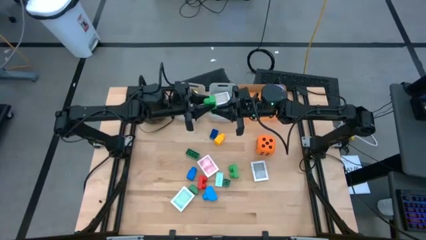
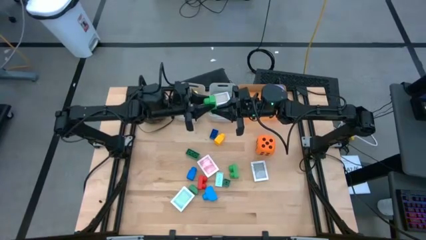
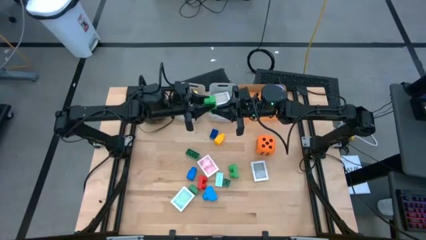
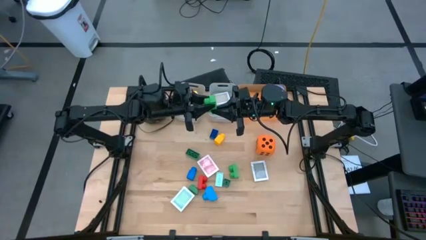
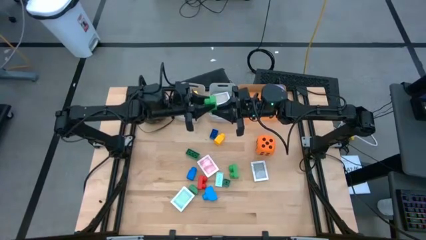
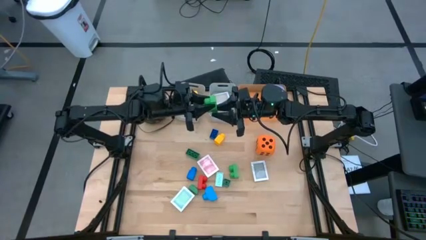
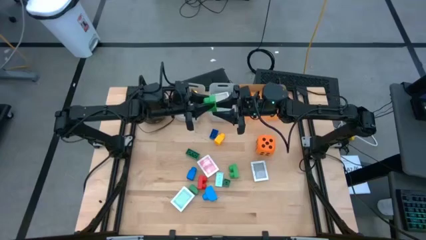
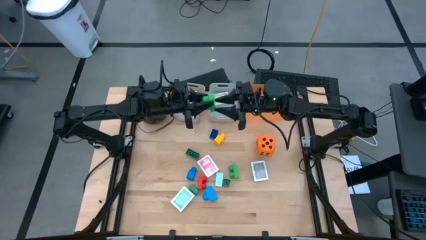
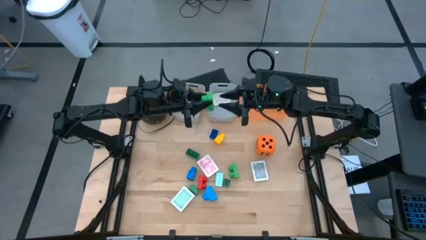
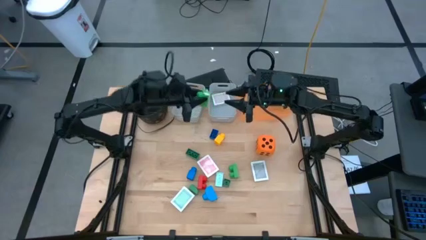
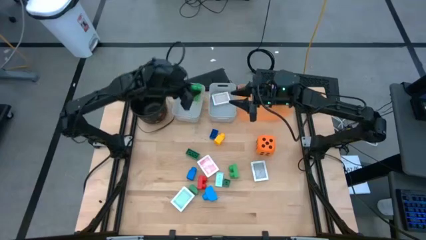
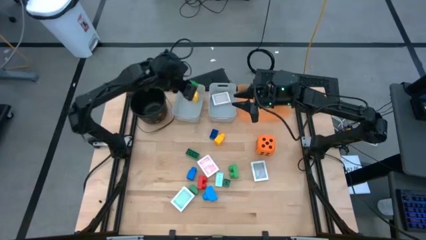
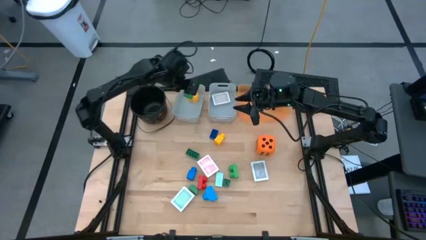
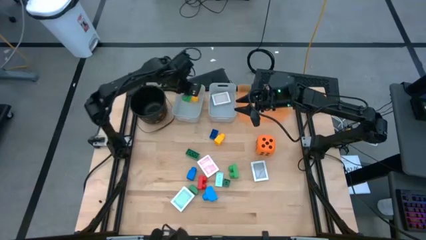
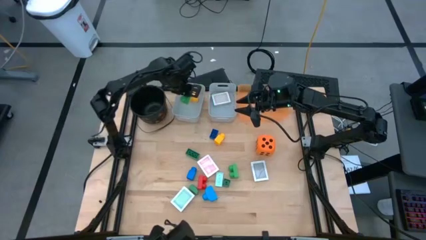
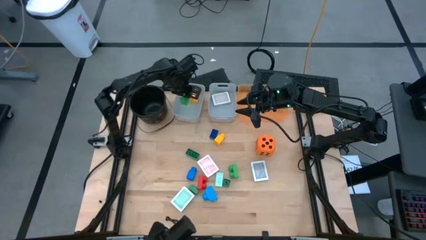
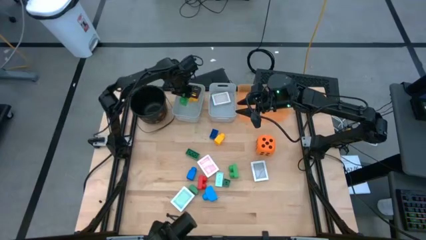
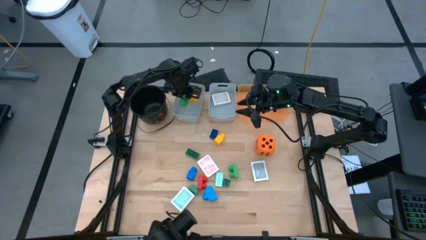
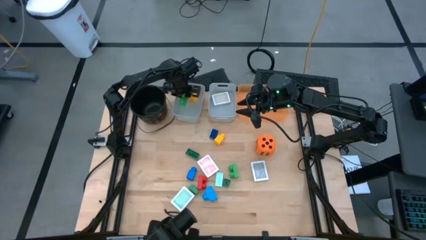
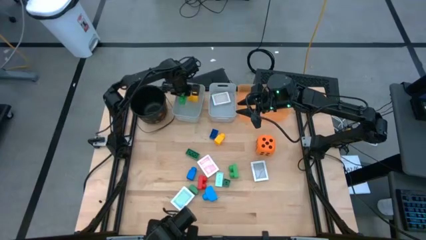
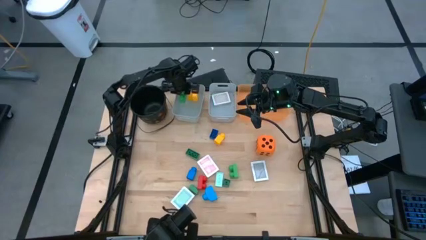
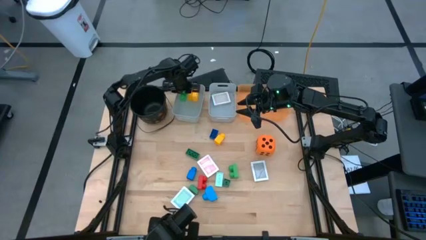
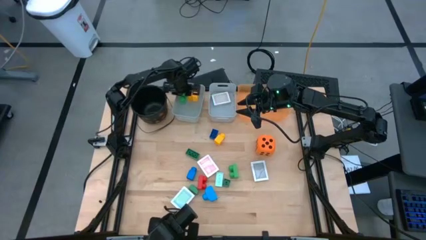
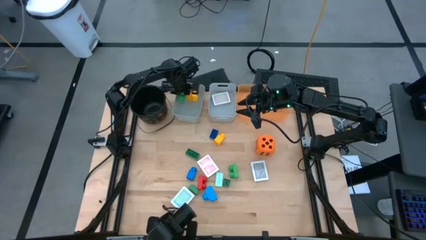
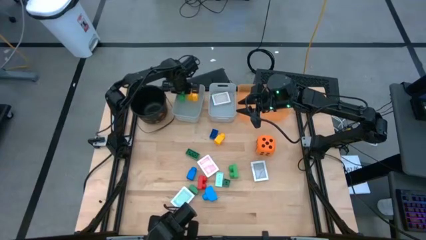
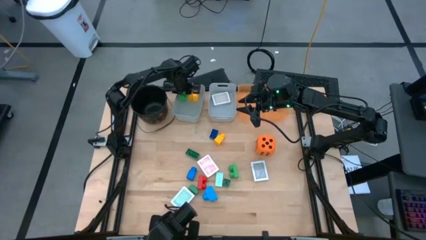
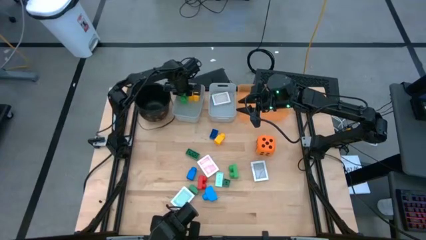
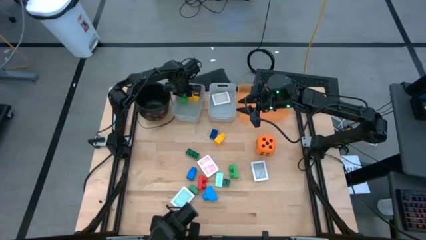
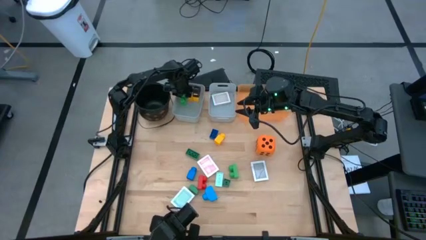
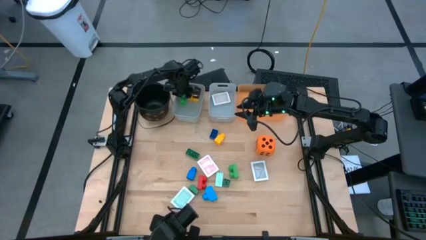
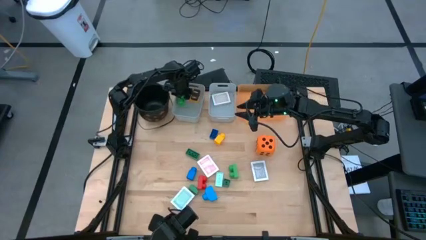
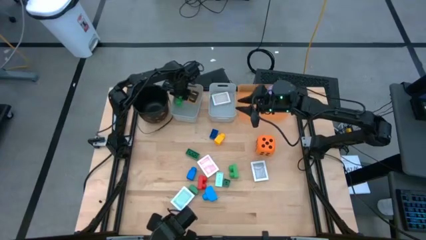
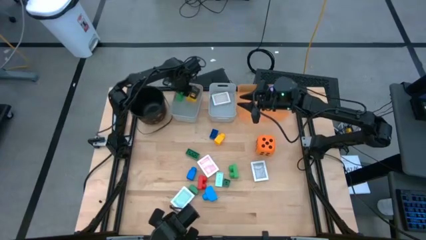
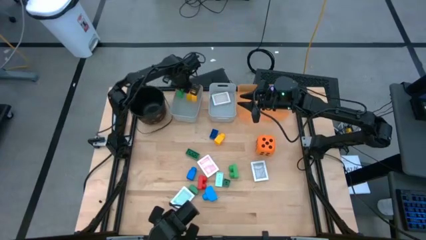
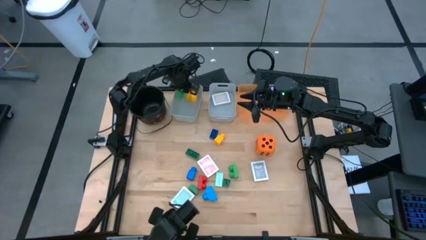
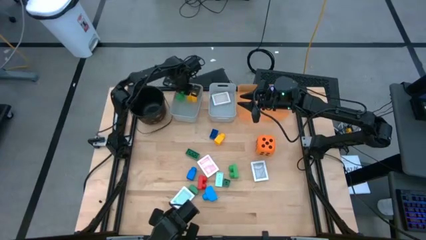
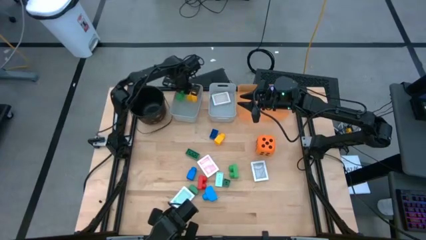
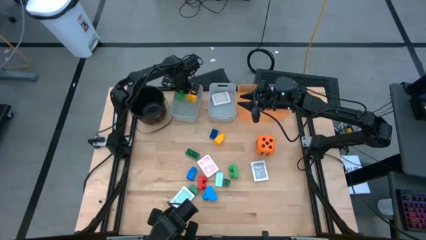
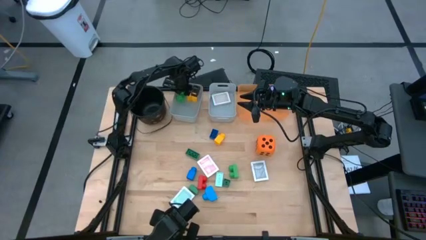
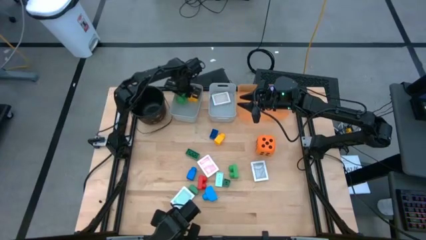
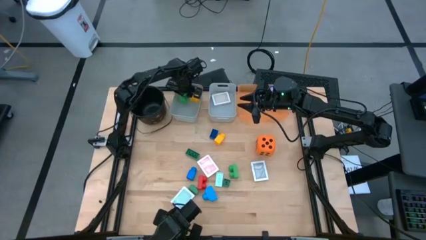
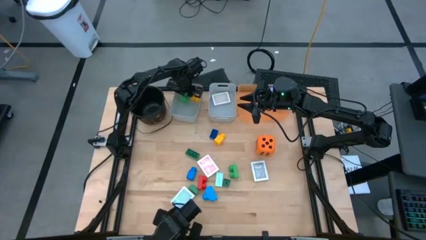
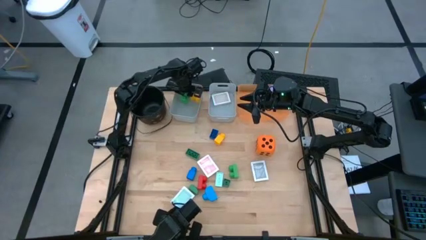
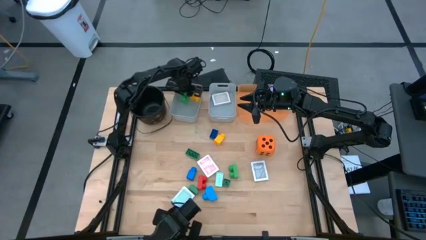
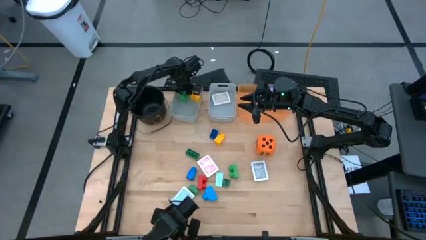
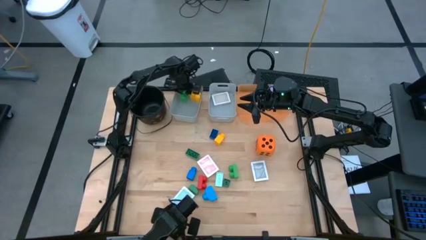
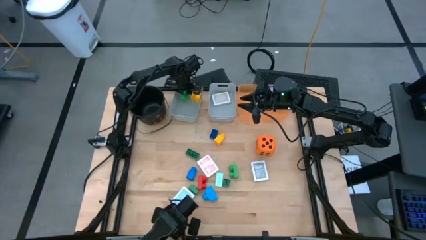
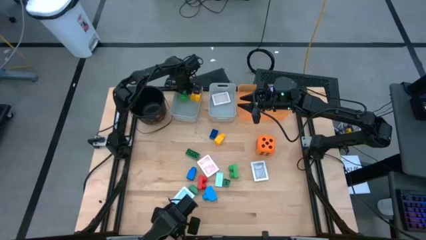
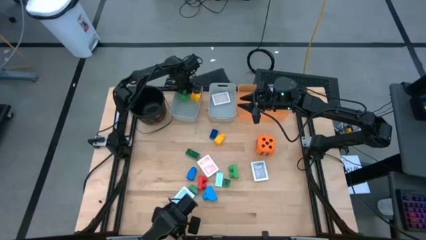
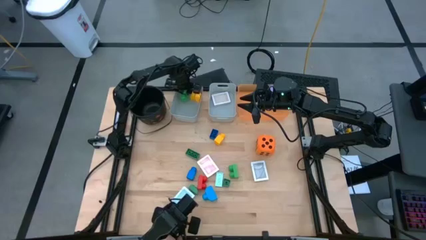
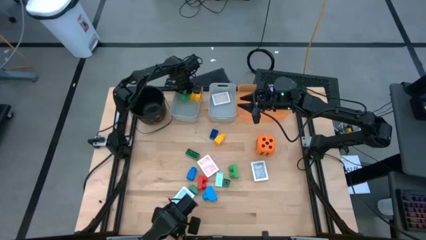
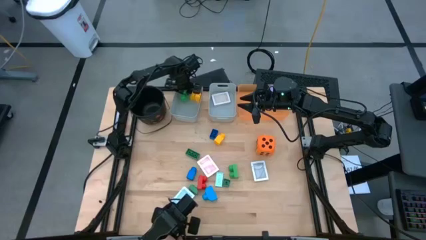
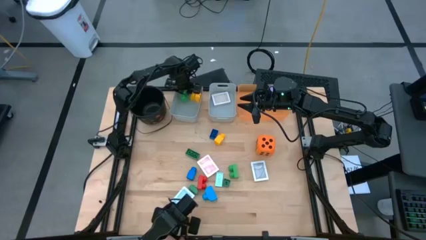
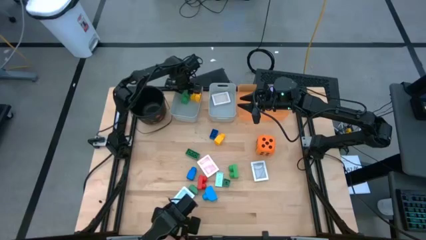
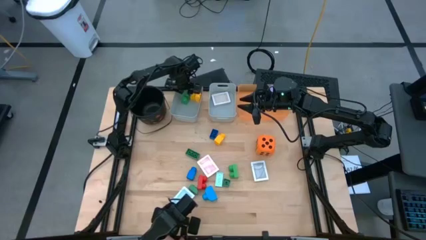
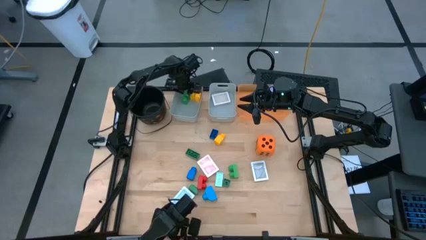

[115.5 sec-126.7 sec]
Task: Pick & Place Toys
Put the green game piece into the left gray bin

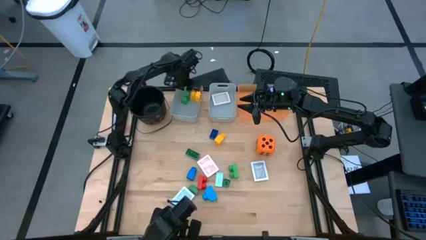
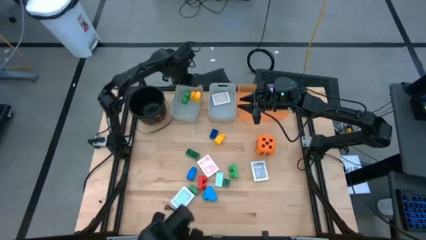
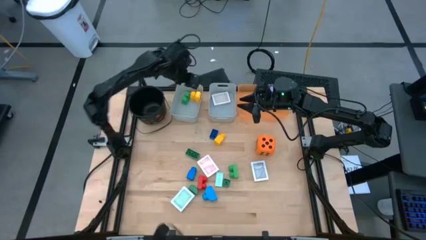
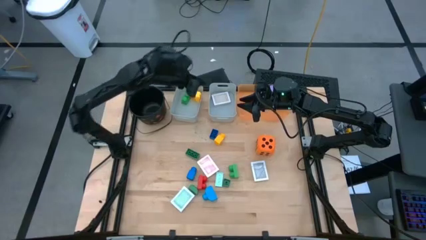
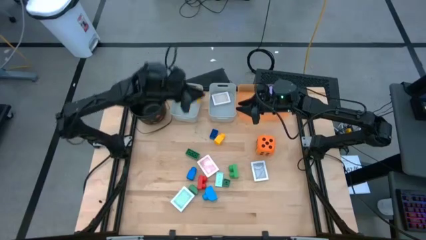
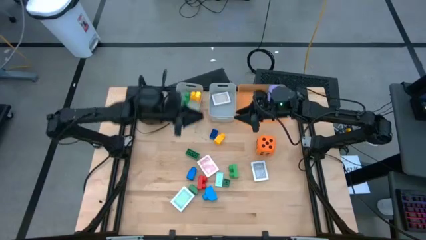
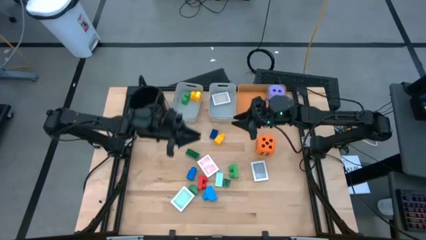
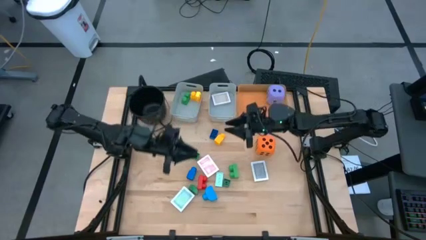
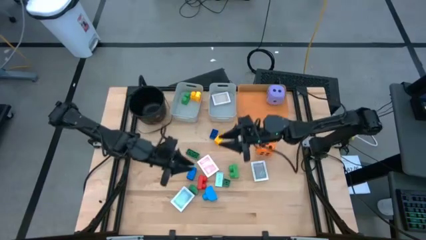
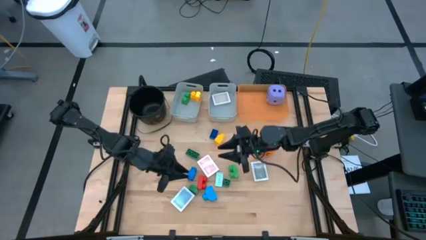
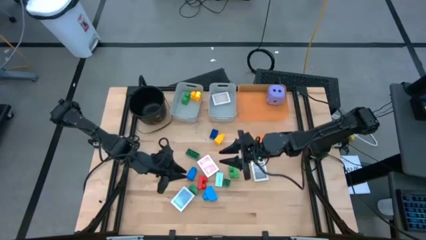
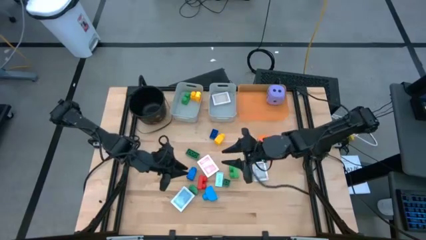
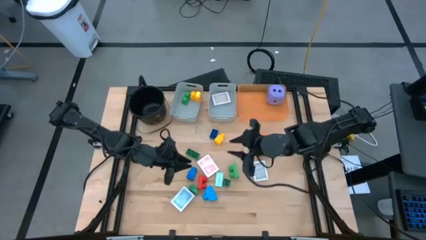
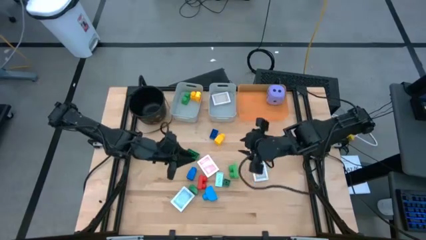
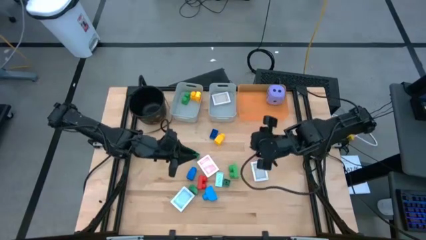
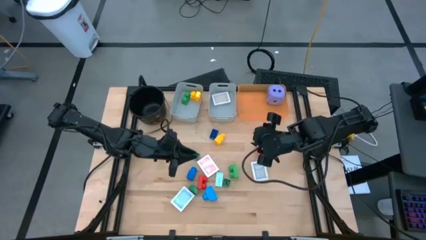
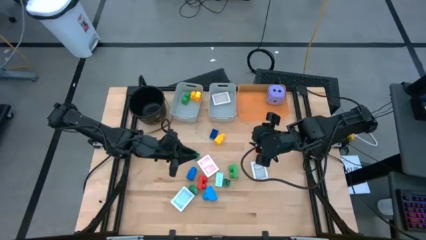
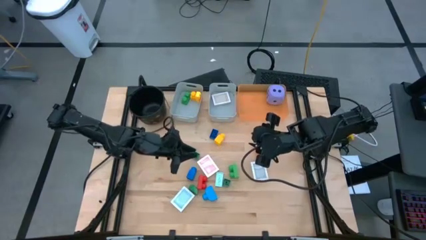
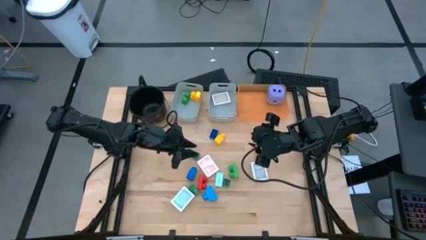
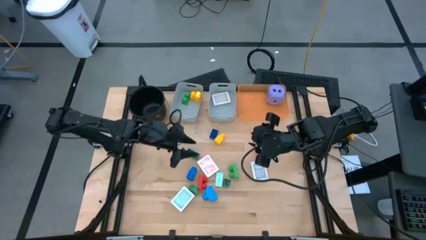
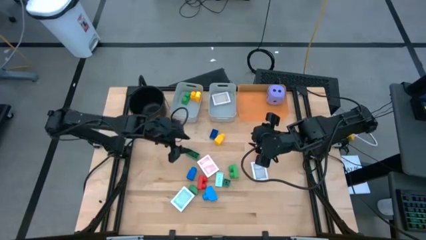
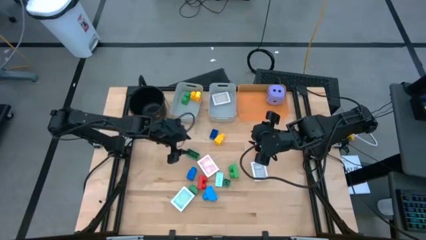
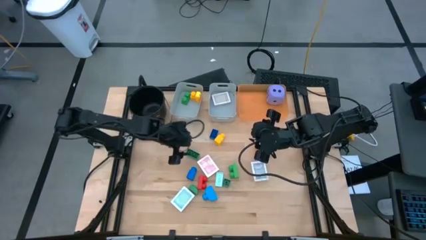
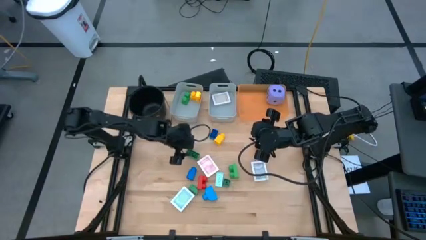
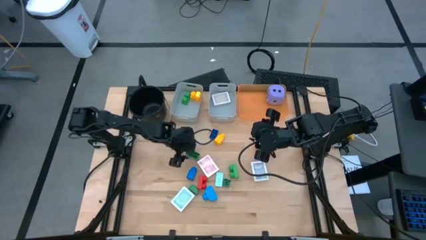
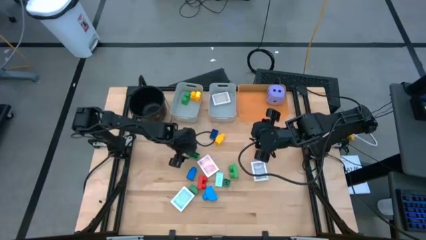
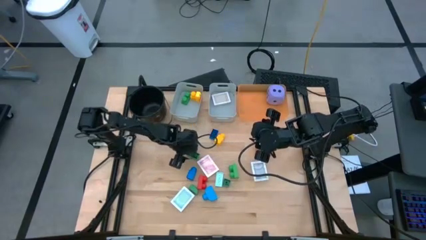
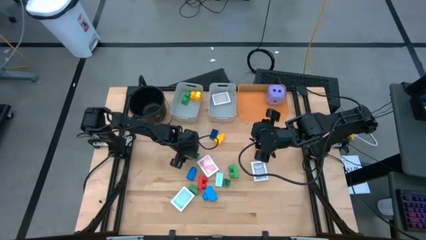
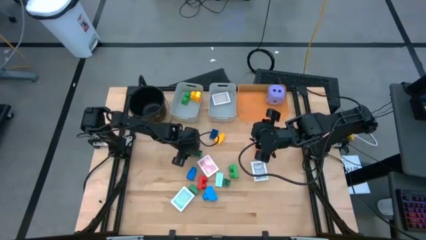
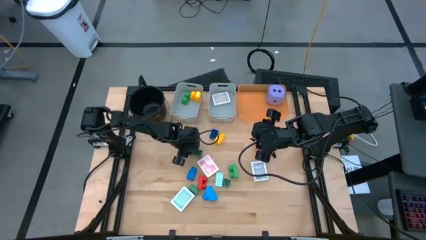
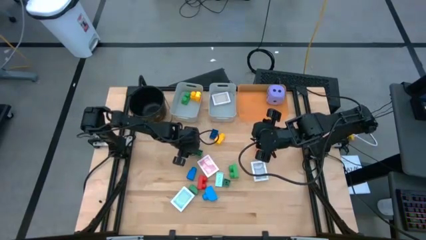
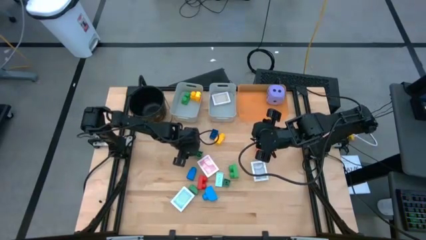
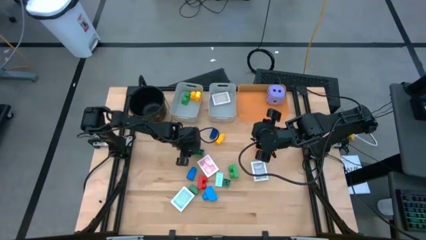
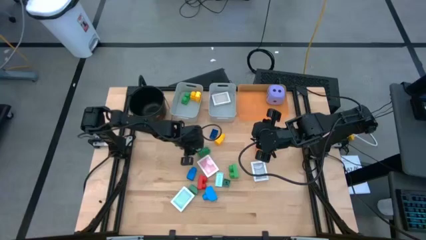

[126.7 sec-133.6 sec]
Put the green game piece into the left gray bin
